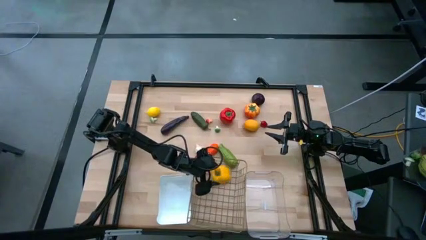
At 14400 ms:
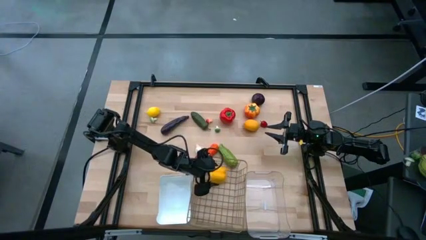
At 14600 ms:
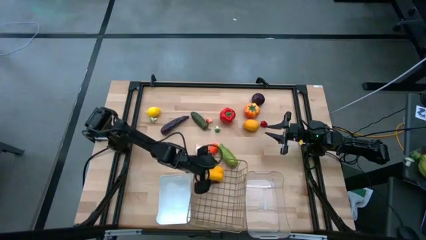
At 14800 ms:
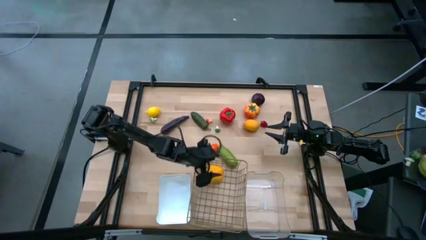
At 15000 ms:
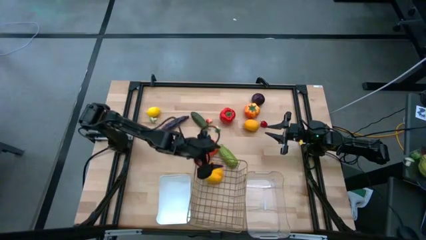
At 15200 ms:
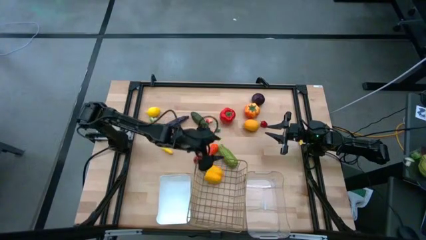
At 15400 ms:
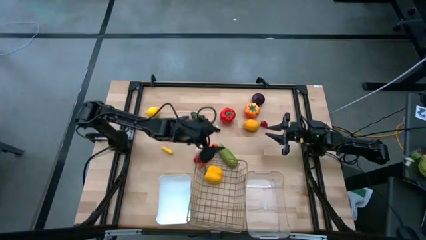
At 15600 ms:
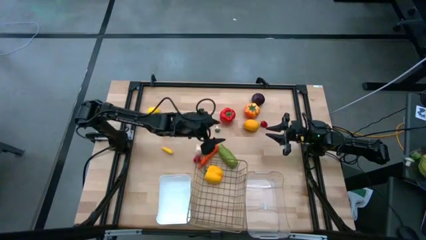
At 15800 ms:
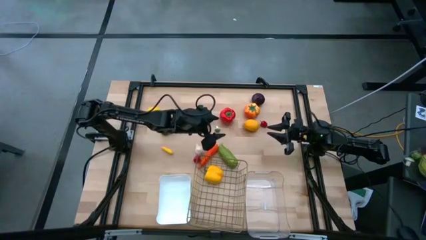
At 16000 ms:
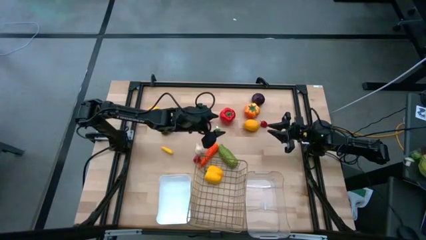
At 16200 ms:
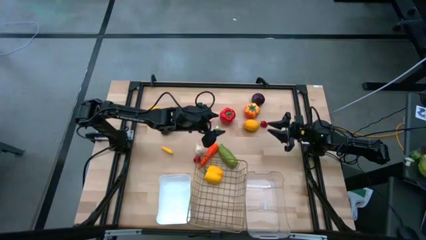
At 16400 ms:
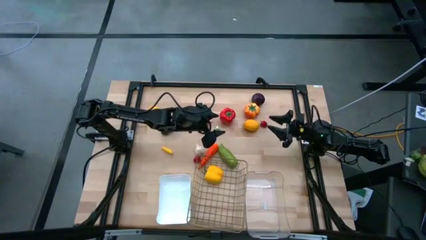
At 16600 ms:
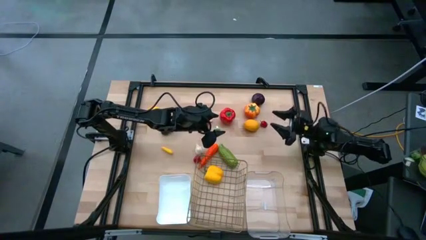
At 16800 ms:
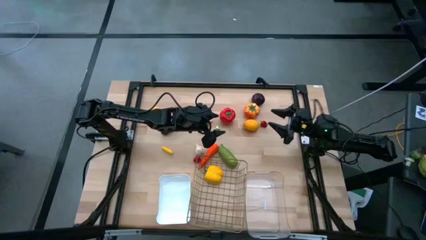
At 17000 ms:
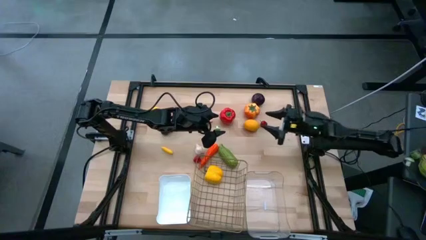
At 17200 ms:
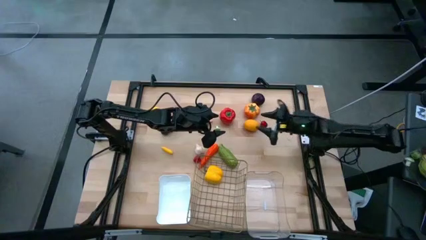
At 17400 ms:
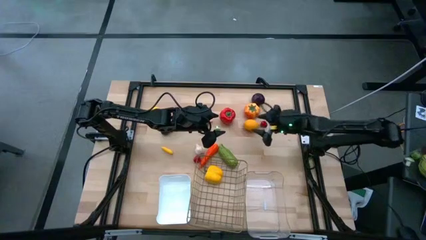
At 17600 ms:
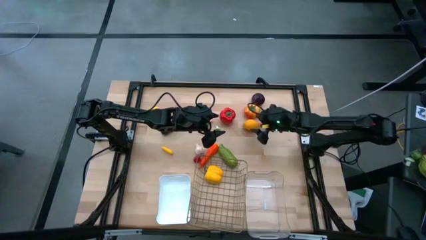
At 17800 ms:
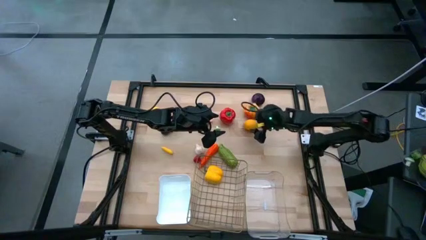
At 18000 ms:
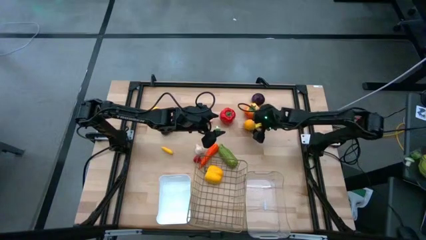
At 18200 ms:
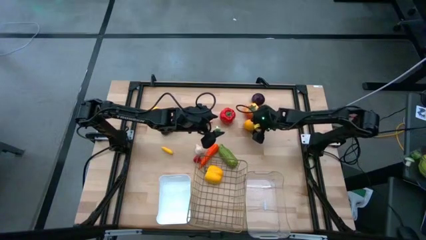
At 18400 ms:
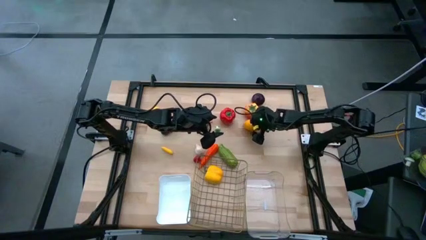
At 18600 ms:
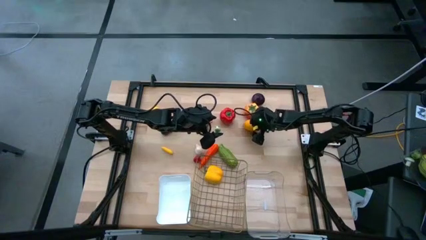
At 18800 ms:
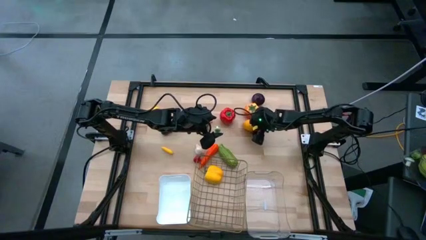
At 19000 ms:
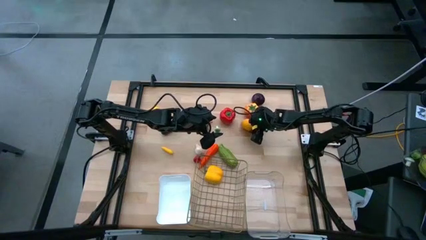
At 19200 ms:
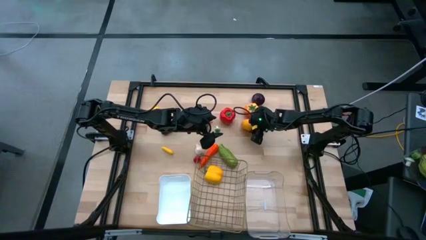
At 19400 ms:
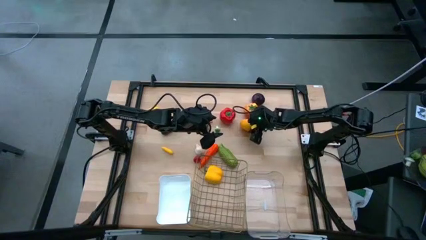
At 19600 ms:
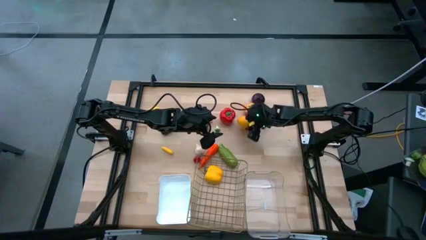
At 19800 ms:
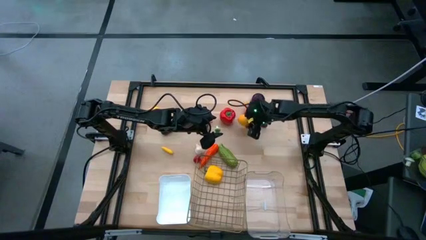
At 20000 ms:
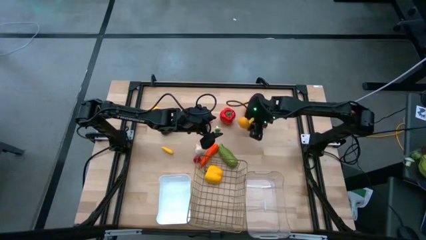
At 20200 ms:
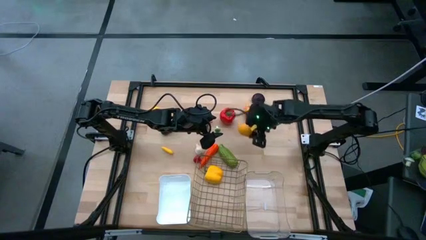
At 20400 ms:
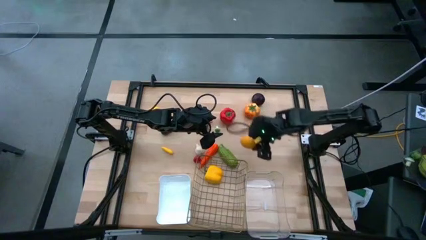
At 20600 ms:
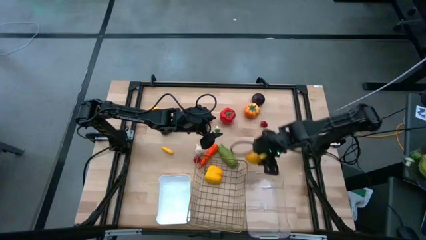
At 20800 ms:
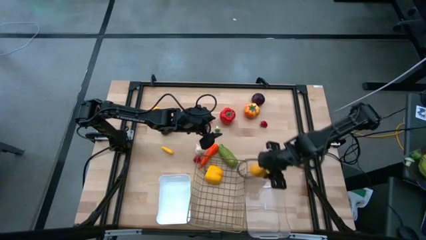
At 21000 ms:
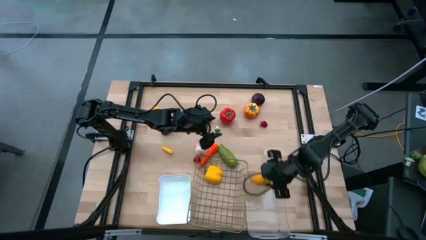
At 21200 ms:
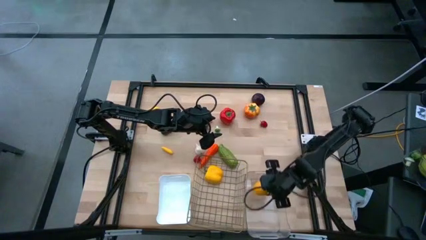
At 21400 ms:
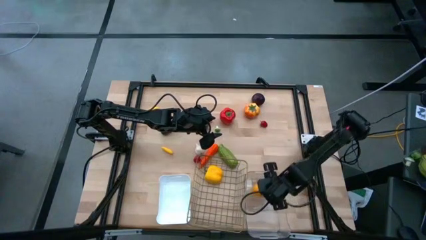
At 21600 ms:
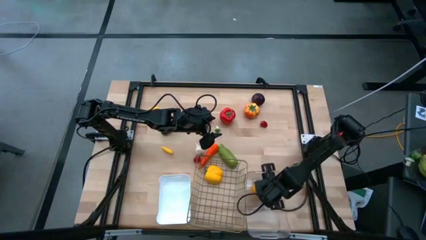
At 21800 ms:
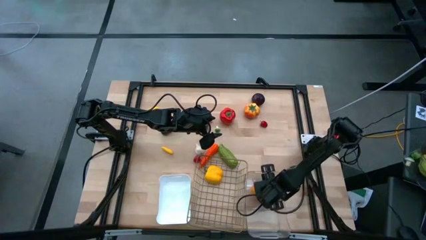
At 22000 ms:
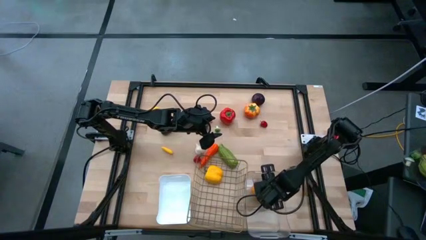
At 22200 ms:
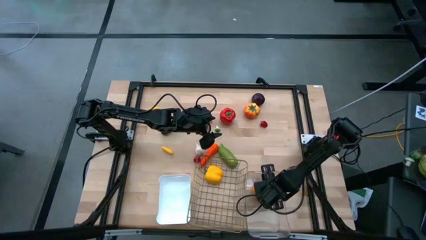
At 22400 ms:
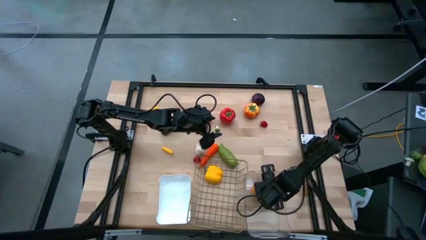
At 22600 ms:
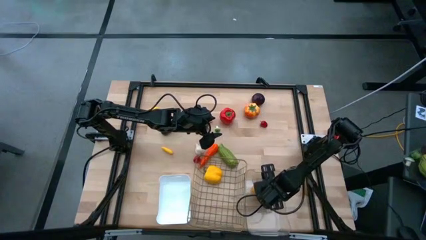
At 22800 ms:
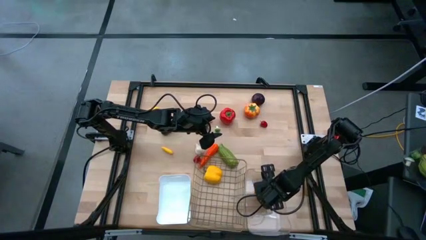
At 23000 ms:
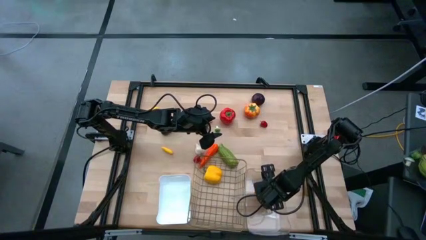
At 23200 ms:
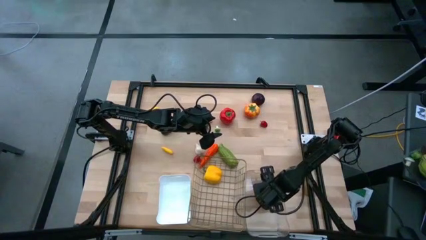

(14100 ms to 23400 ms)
Task: Sort produce into baskets
Put the right yellow lemon into the transparent bin

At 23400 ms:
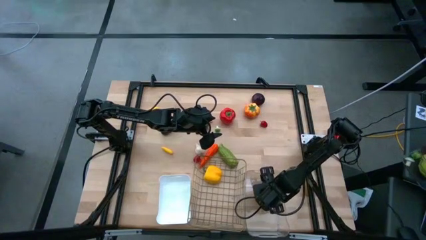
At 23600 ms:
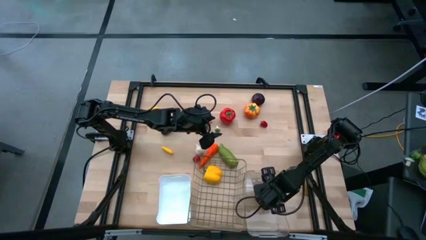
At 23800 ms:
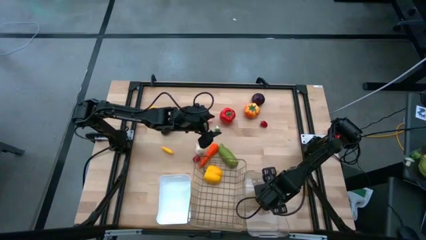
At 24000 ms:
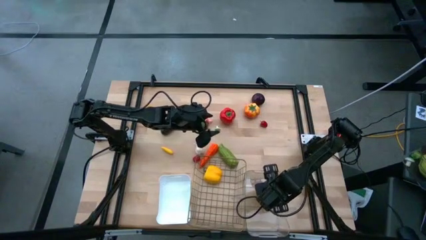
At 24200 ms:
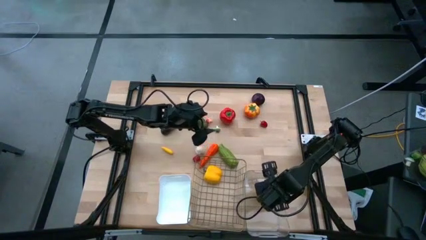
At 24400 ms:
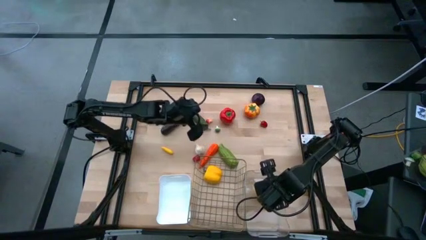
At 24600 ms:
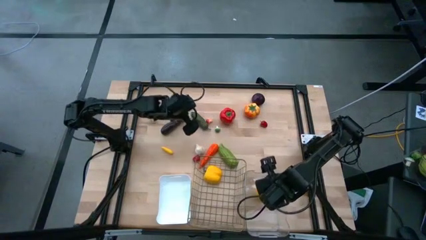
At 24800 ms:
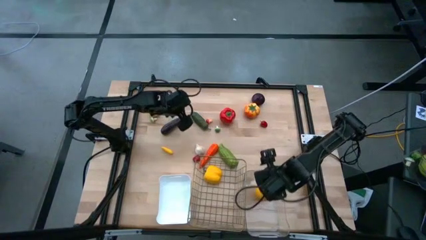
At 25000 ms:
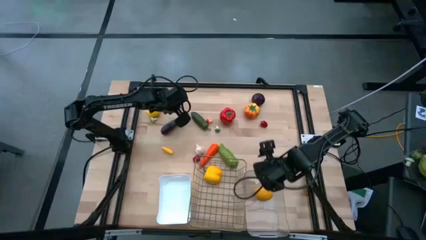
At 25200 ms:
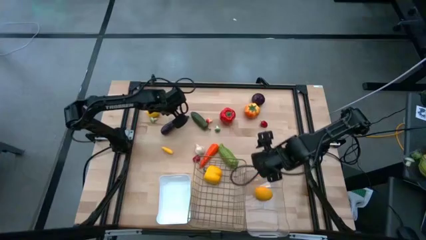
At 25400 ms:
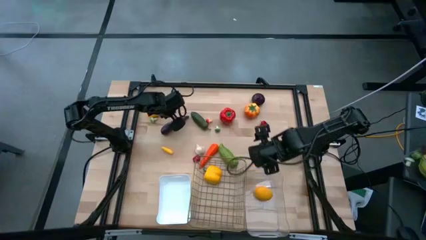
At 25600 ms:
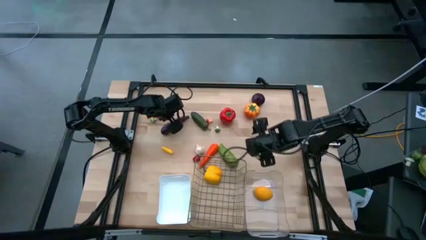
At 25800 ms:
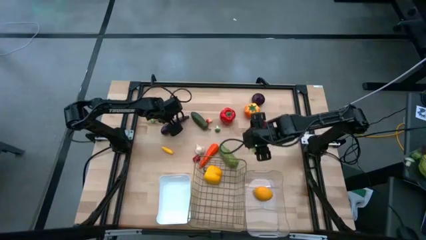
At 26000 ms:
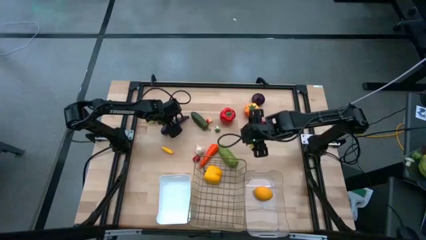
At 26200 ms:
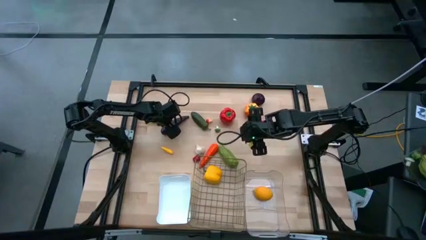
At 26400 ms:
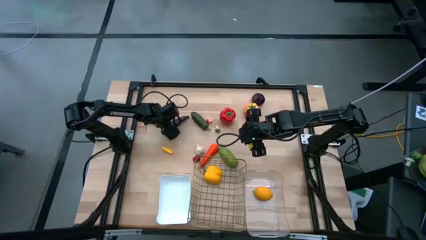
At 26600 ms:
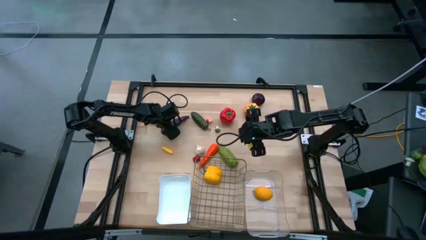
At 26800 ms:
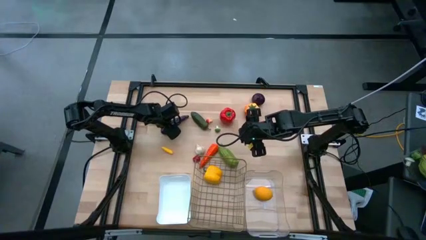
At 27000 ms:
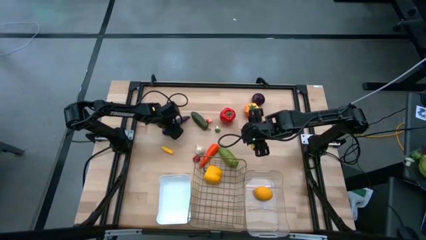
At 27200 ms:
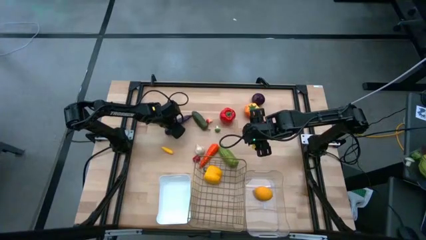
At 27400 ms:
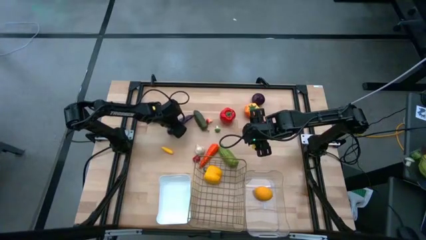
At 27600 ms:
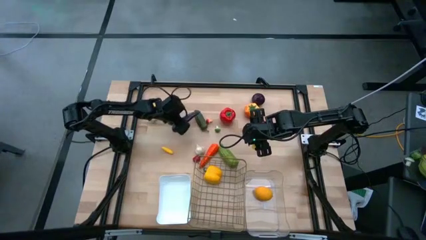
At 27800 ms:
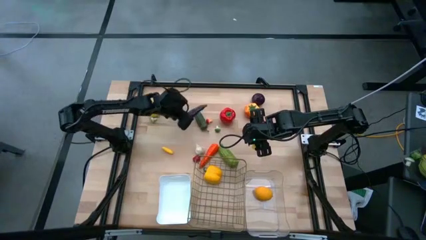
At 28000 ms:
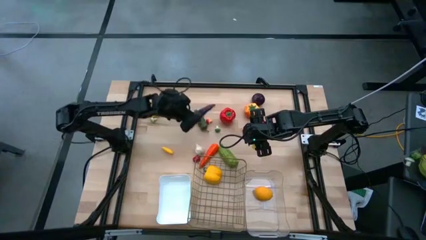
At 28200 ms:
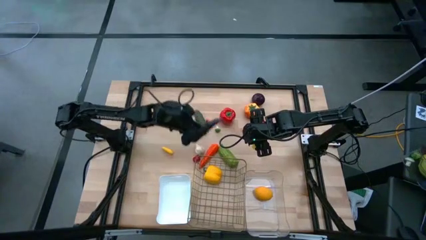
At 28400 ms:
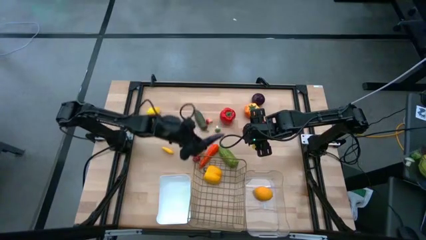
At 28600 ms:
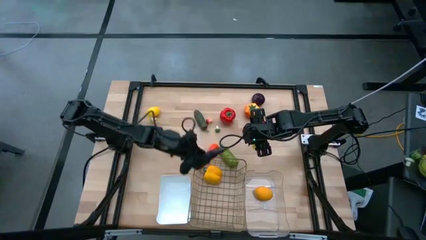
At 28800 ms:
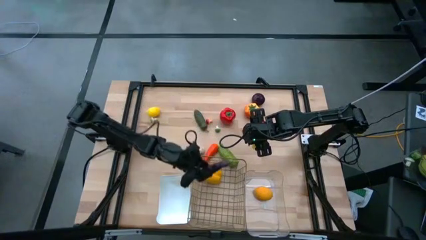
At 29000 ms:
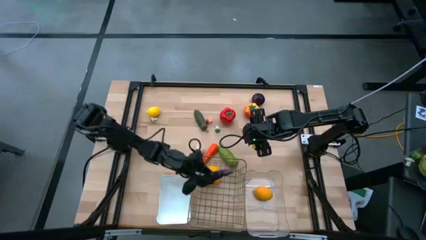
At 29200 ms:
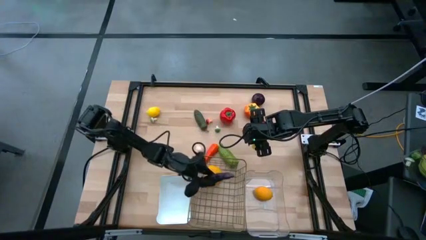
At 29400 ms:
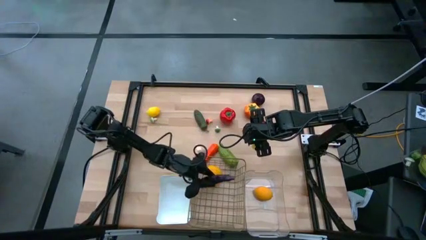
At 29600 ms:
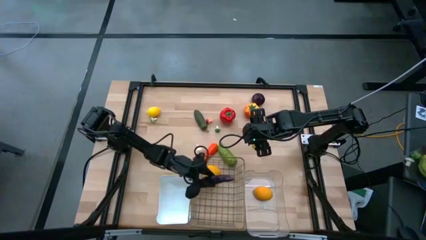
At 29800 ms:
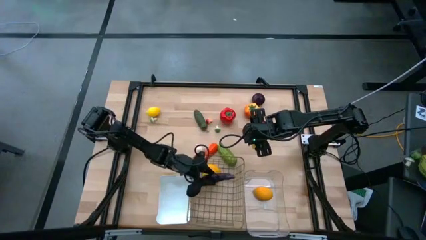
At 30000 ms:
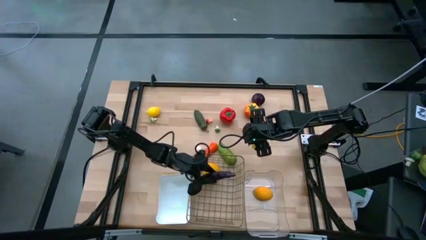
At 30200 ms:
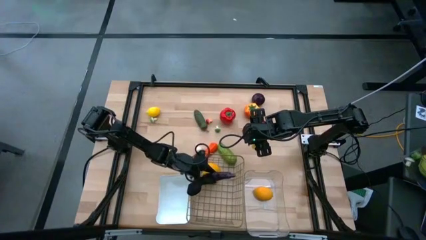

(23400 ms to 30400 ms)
Put the eggplant into the wire basket
